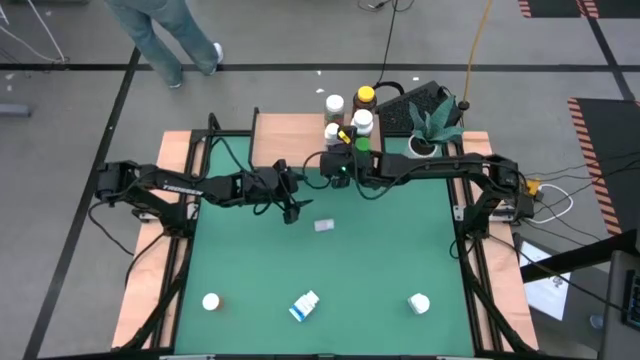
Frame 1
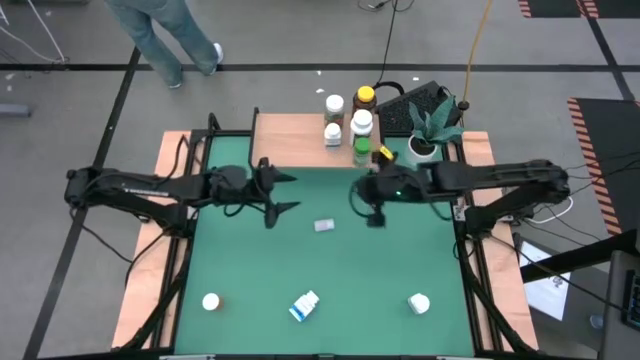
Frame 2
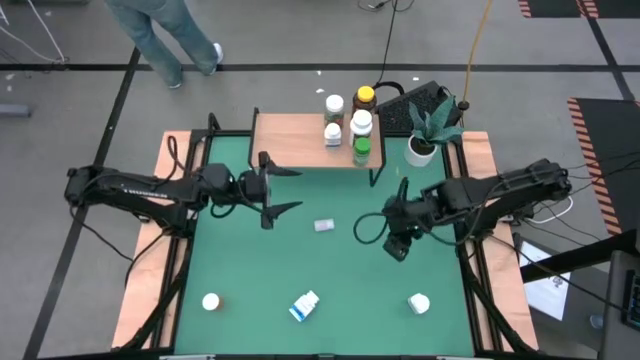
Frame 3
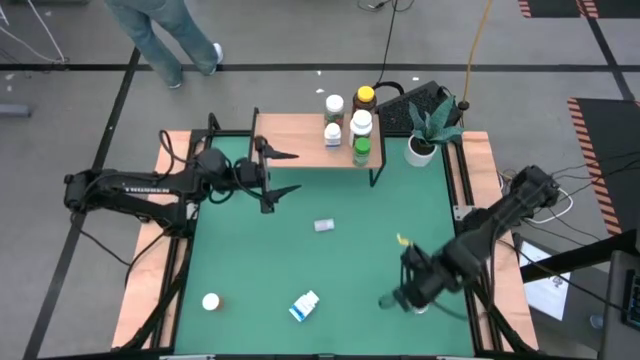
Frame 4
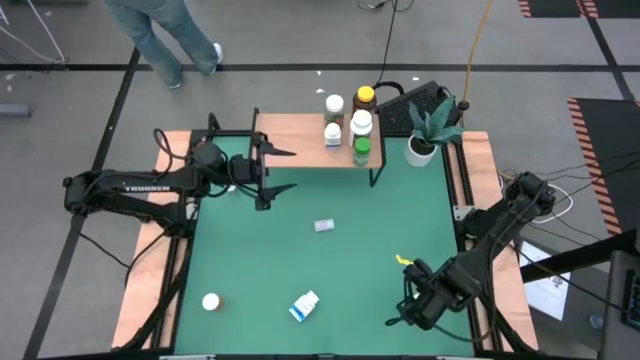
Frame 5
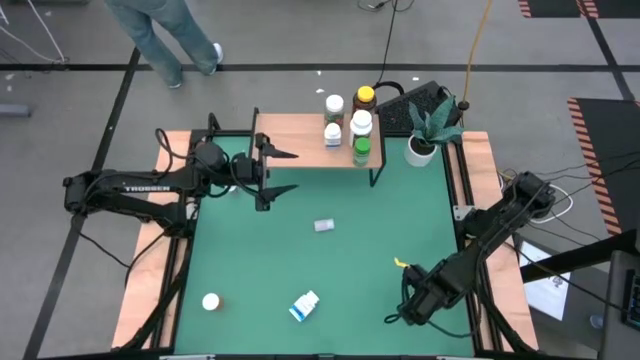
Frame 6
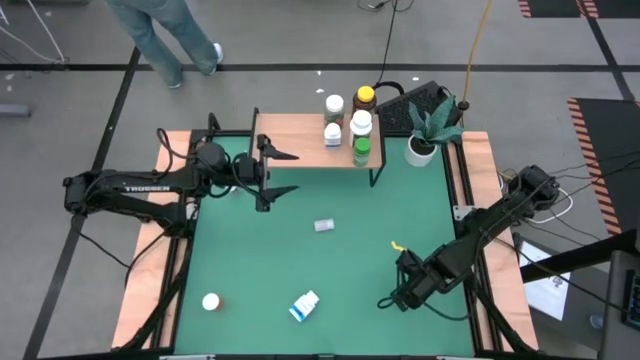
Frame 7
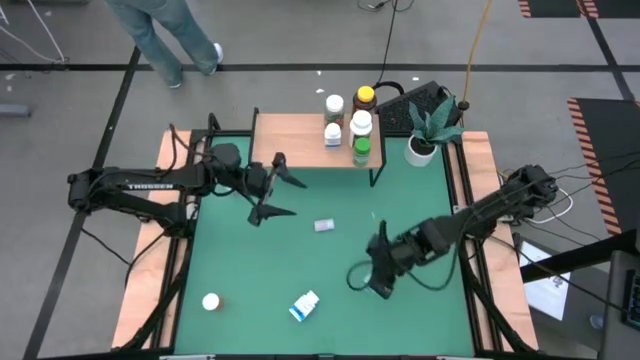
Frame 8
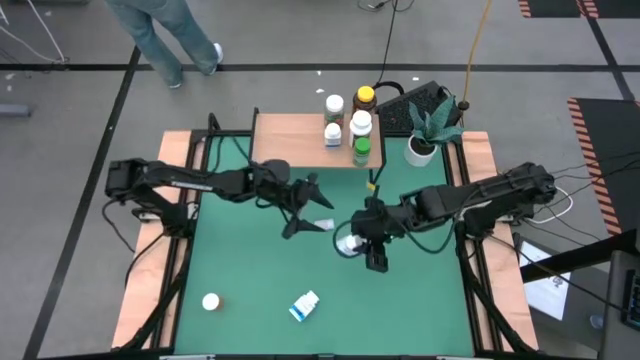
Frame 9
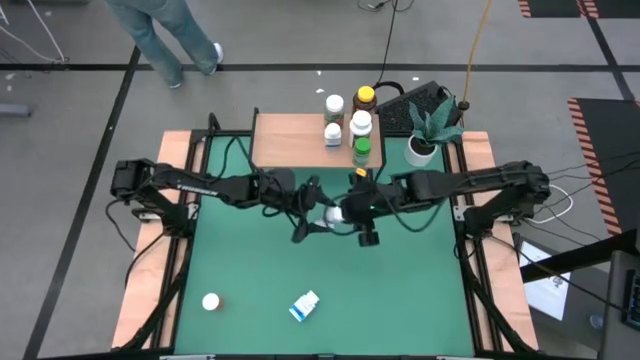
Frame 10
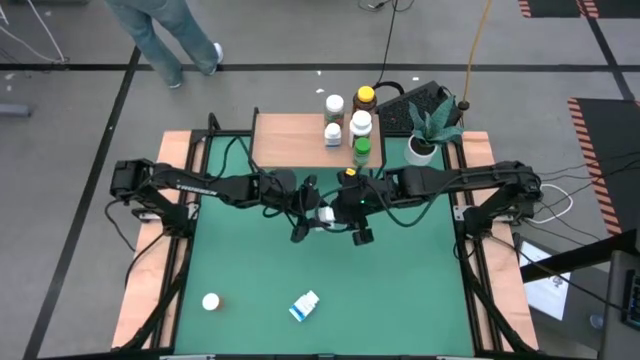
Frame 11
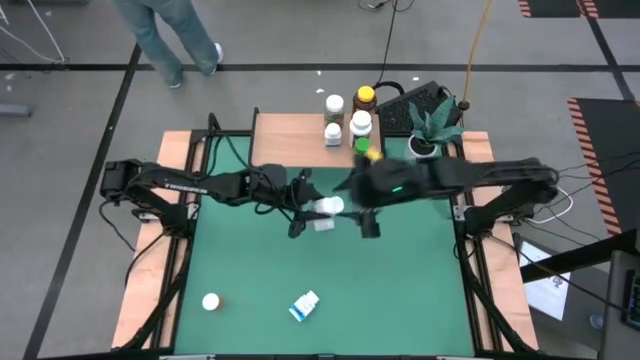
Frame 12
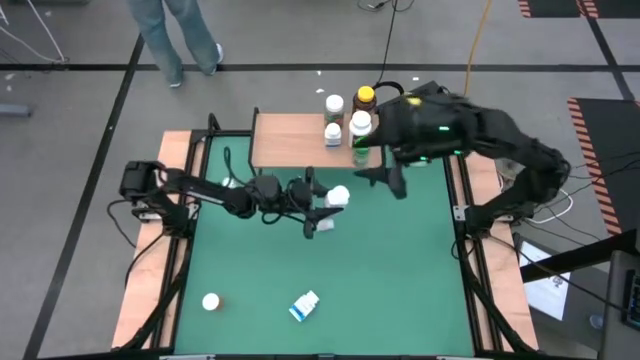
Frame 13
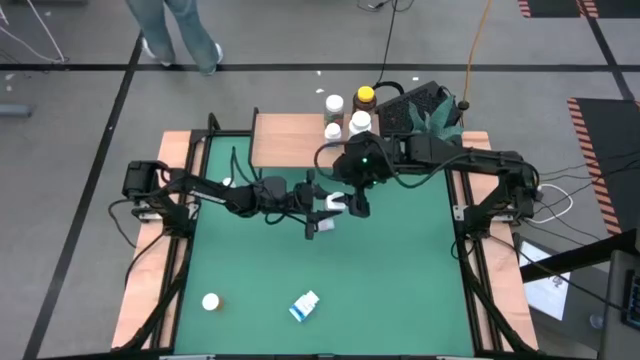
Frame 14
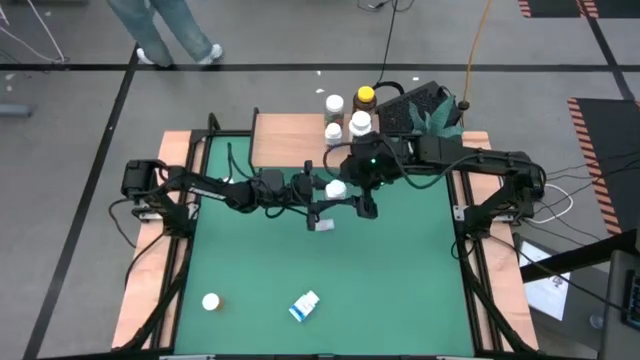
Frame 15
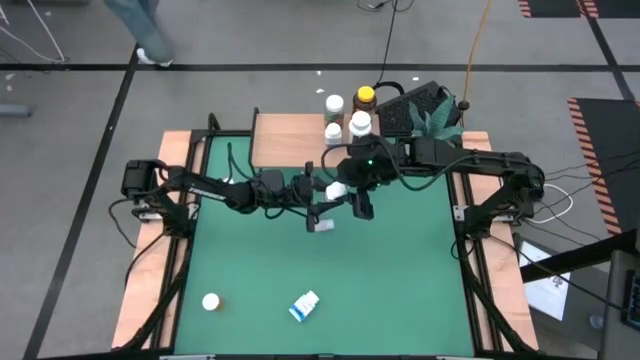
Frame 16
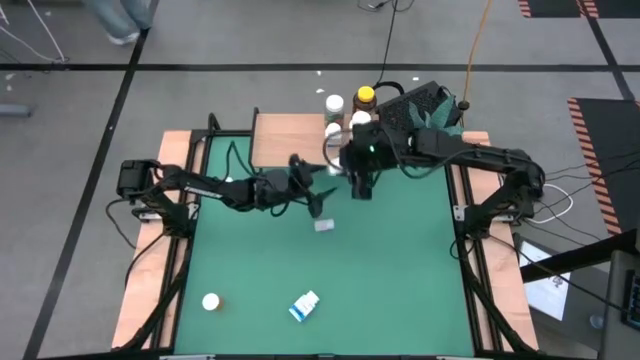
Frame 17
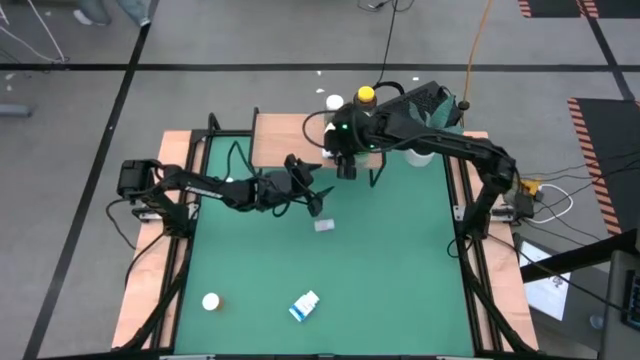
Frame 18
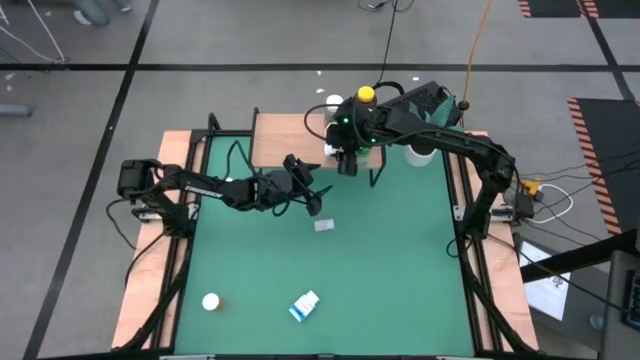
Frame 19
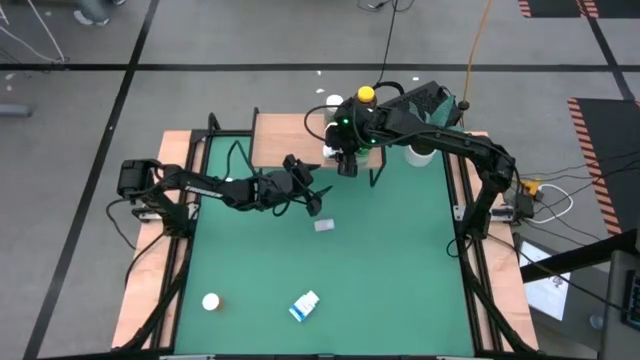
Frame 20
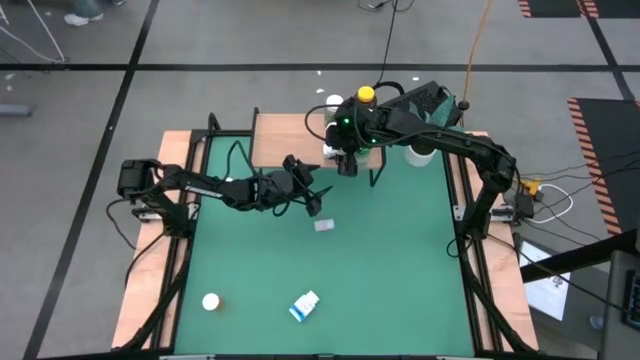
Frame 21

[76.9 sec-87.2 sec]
Task: Pick and place medicine bottles onto shelf by color
Put the right blue white medicine bottle on the shelf

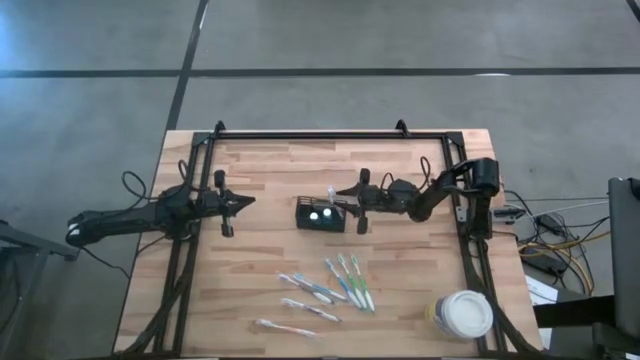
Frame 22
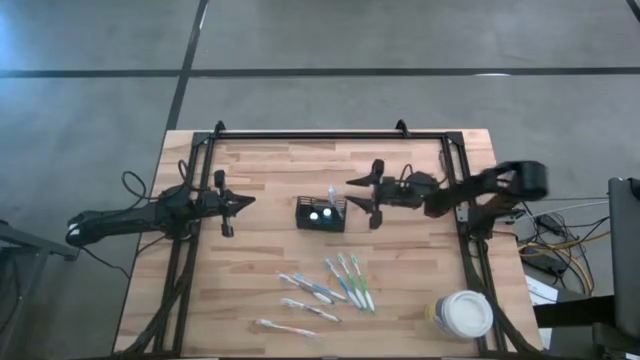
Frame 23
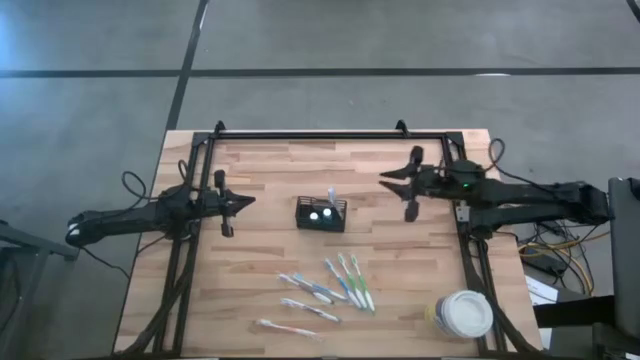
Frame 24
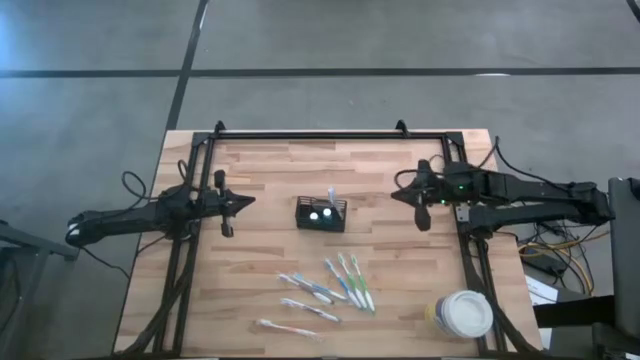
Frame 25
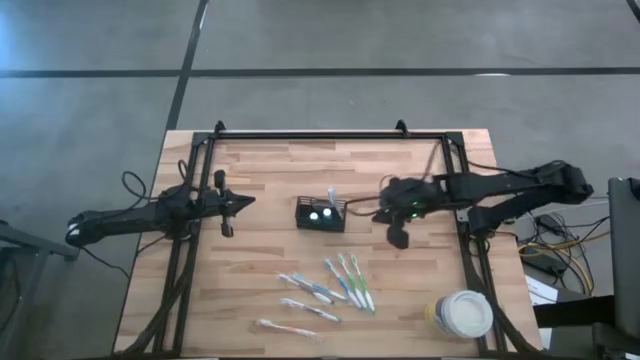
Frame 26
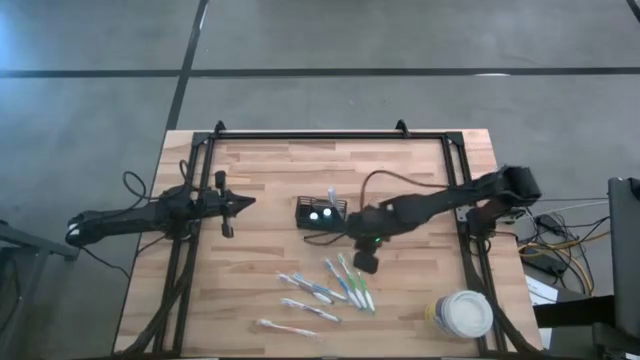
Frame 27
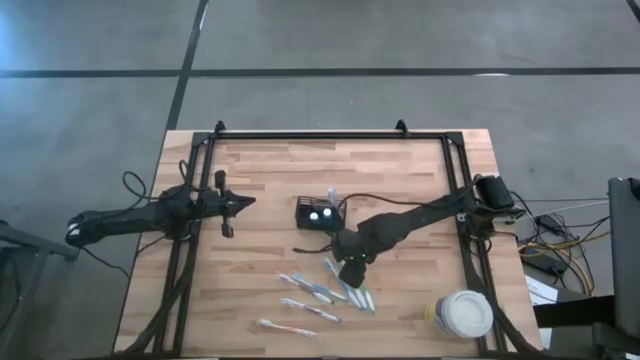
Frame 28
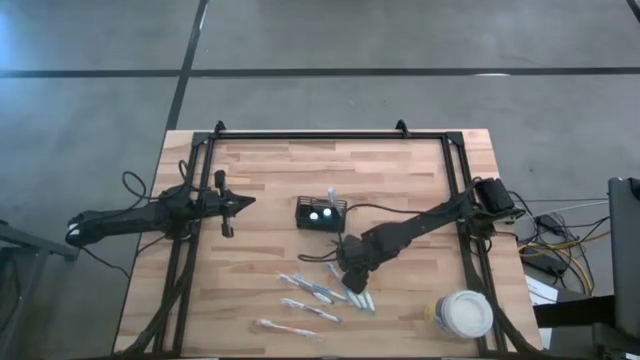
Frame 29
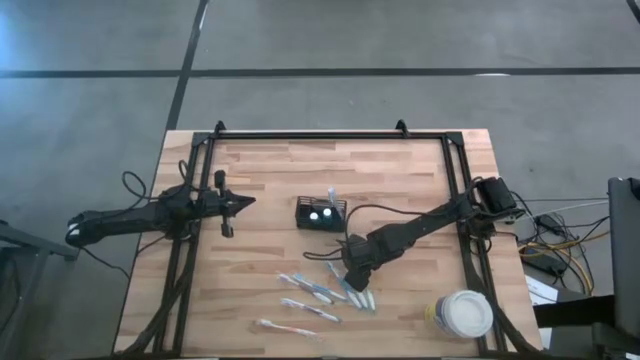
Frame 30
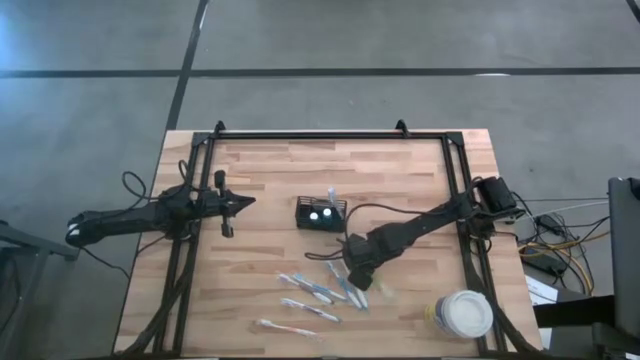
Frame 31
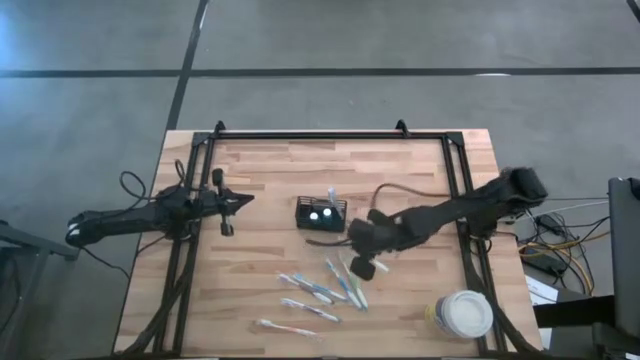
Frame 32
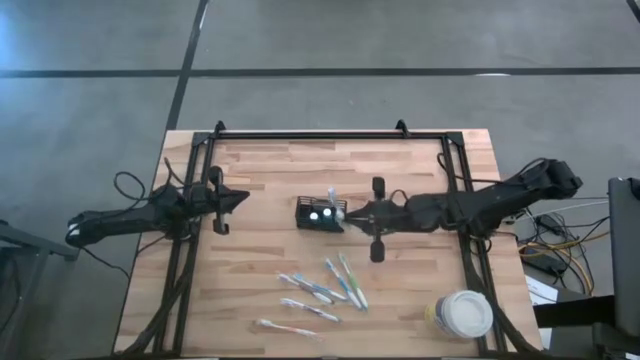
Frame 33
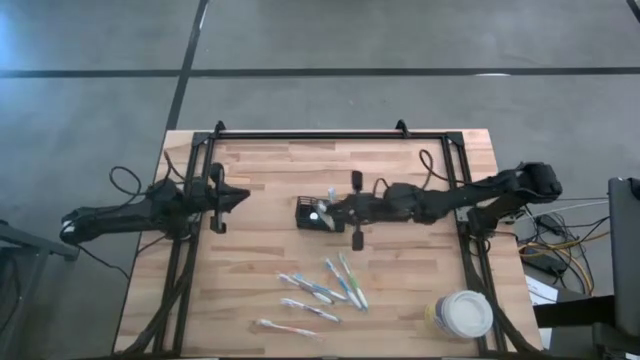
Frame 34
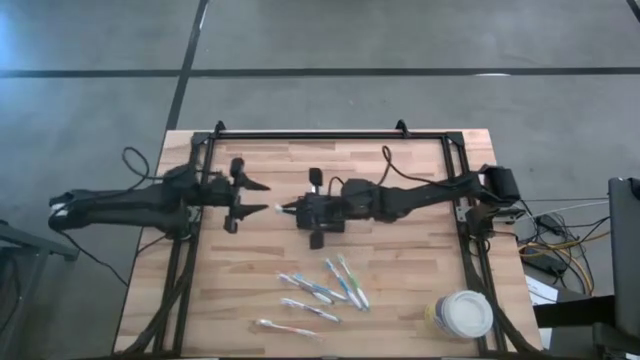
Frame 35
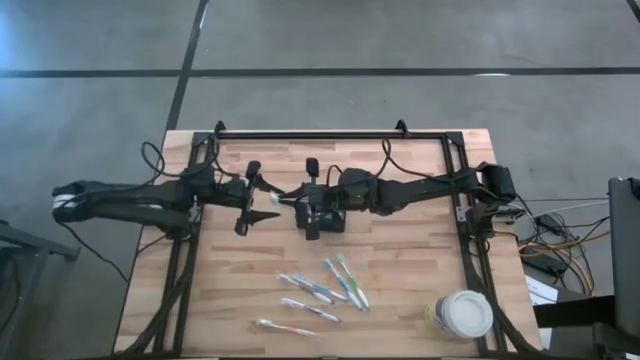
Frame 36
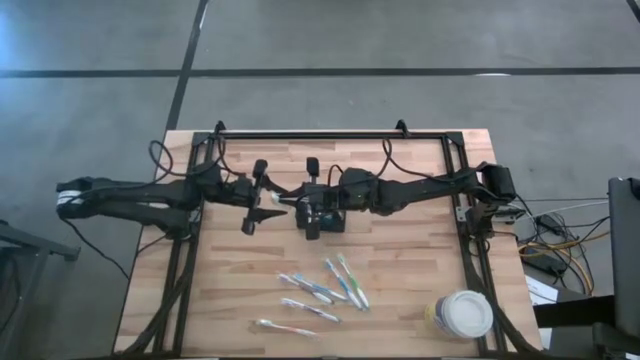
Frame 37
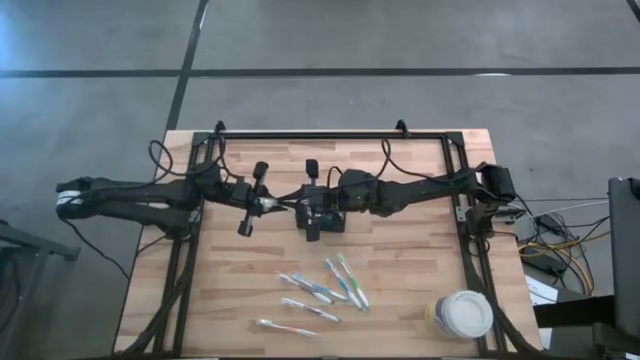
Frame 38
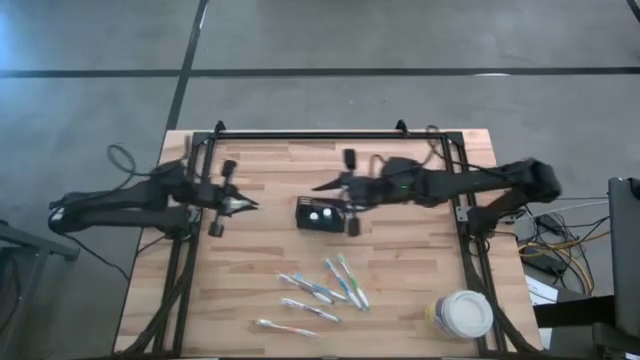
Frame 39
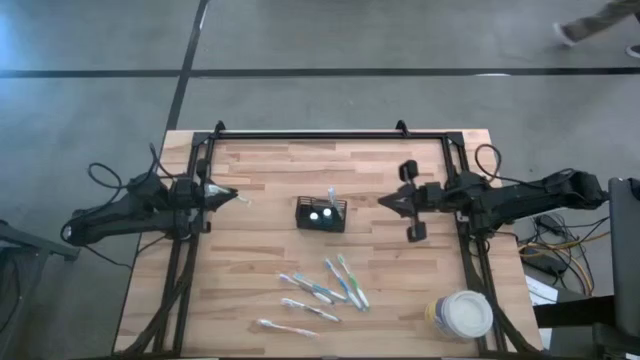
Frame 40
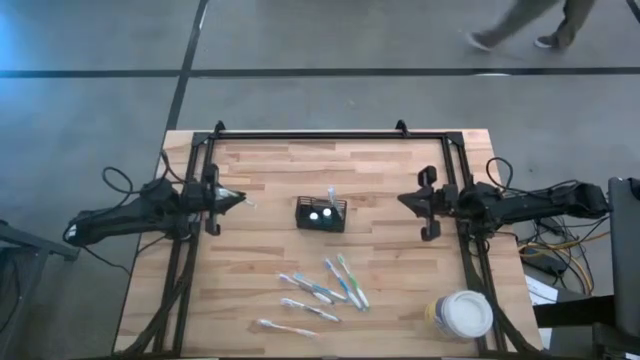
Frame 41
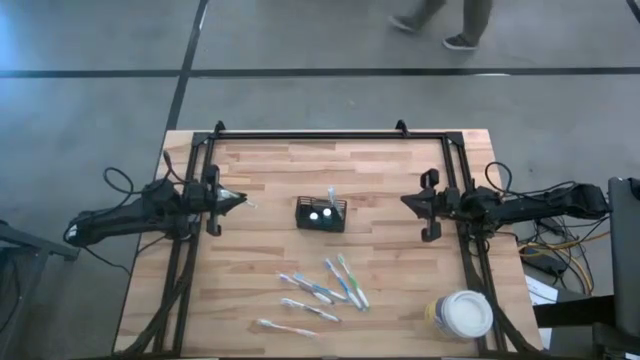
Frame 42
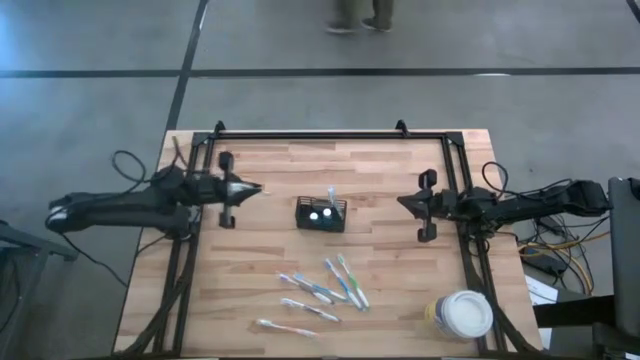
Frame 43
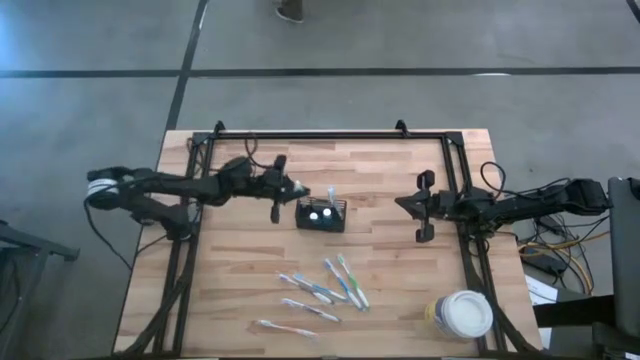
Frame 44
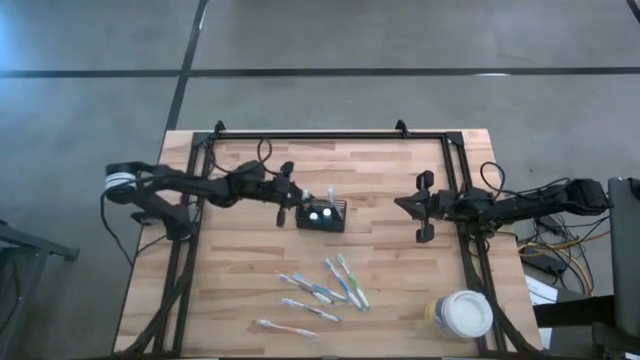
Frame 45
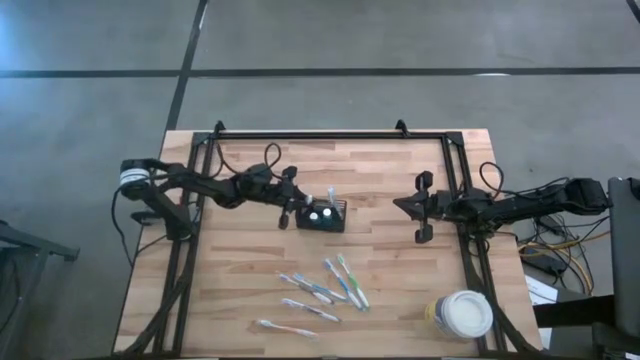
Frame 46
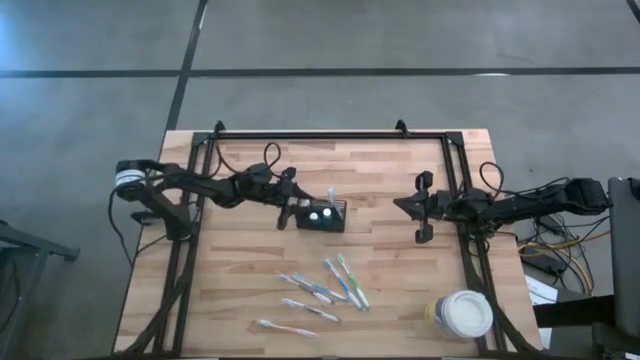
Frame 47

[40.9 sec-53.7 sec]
Task: Pick & Place toothbrushing station
Put the right green toothbrush into the wire organizer
